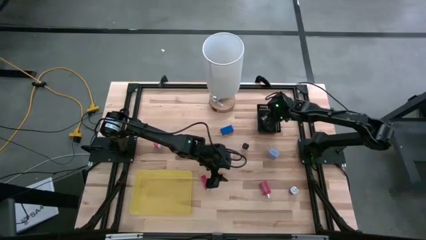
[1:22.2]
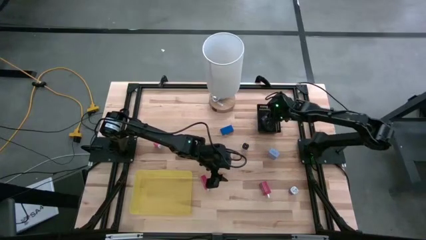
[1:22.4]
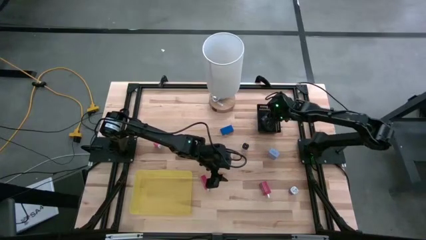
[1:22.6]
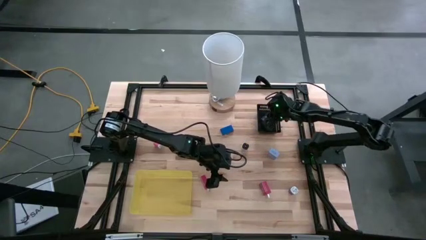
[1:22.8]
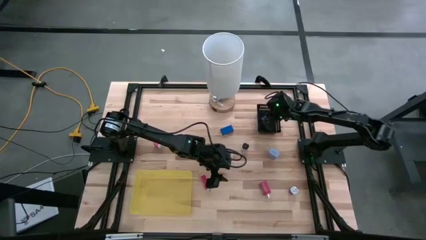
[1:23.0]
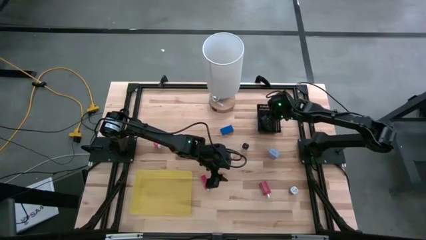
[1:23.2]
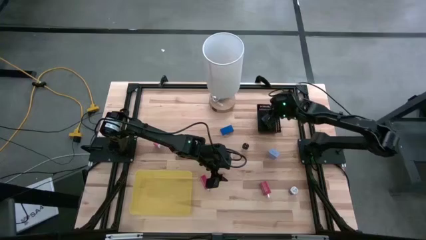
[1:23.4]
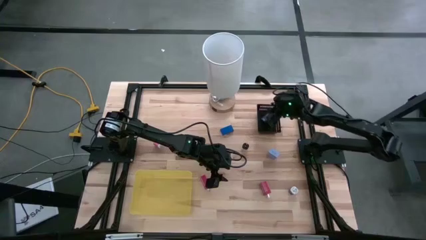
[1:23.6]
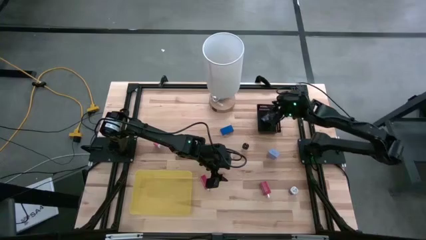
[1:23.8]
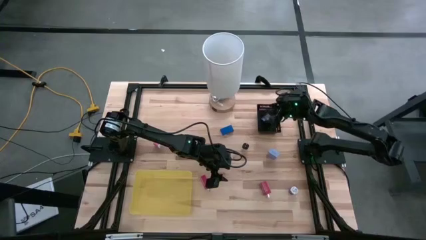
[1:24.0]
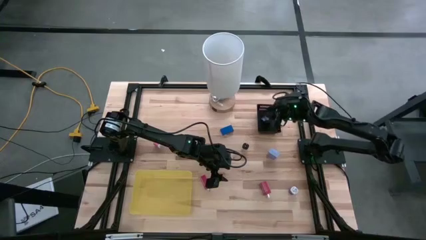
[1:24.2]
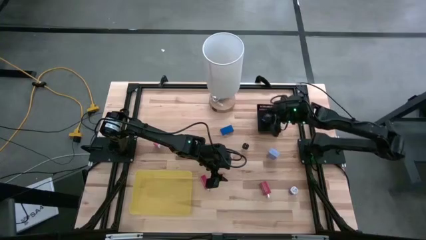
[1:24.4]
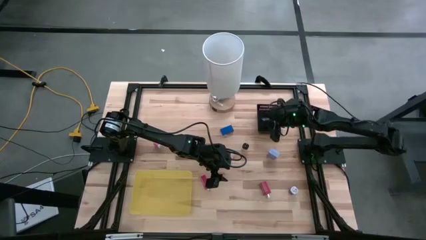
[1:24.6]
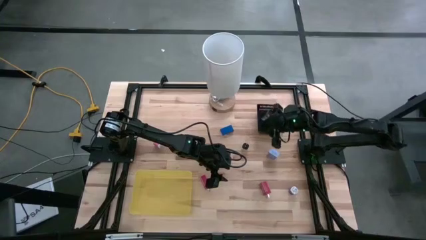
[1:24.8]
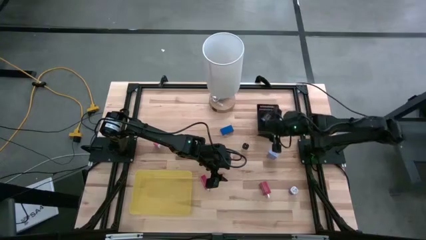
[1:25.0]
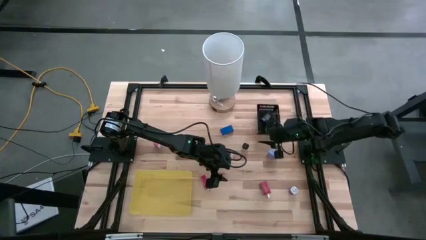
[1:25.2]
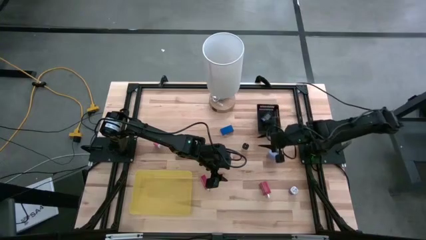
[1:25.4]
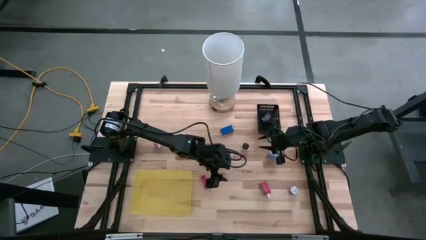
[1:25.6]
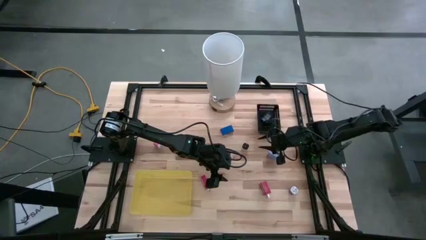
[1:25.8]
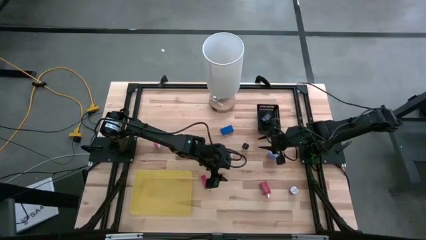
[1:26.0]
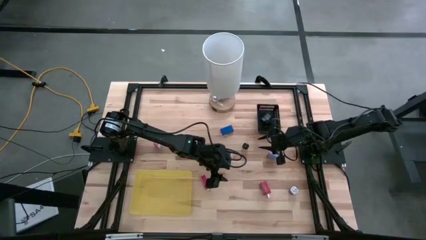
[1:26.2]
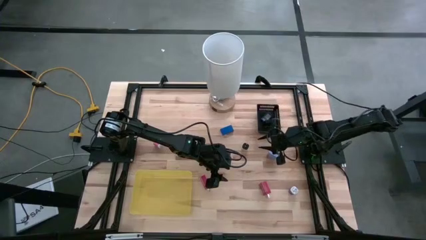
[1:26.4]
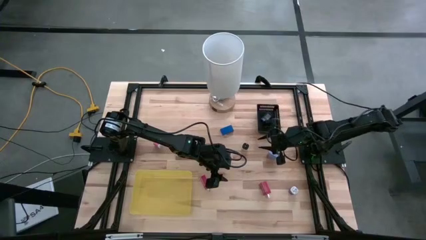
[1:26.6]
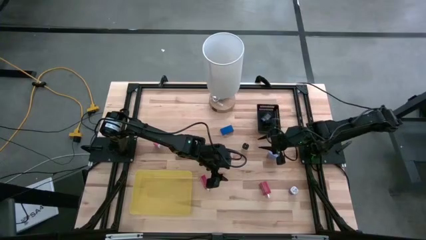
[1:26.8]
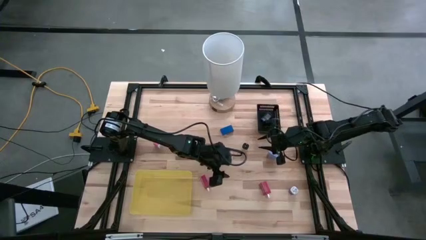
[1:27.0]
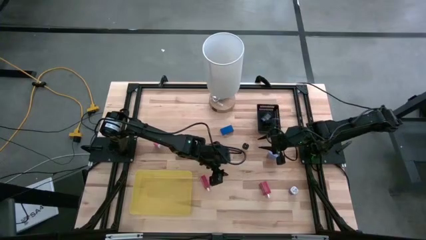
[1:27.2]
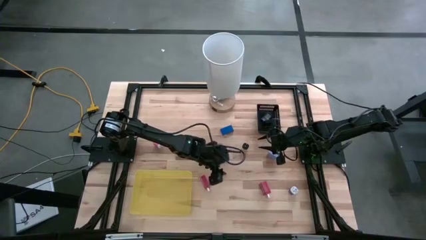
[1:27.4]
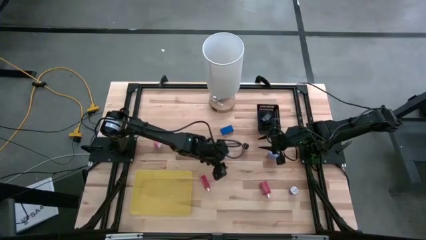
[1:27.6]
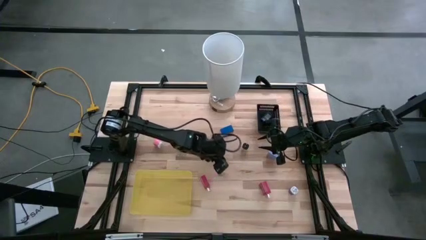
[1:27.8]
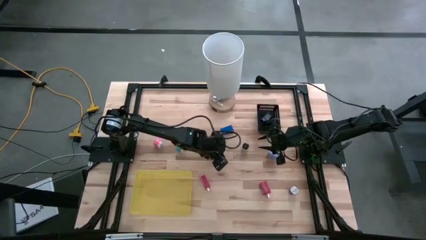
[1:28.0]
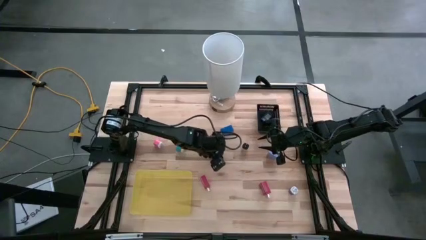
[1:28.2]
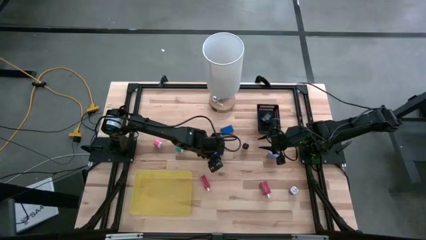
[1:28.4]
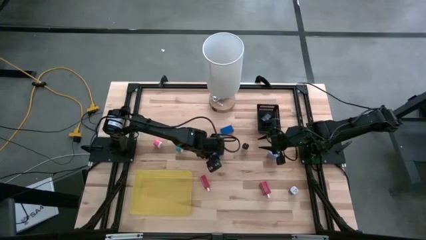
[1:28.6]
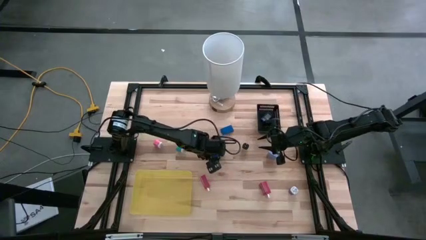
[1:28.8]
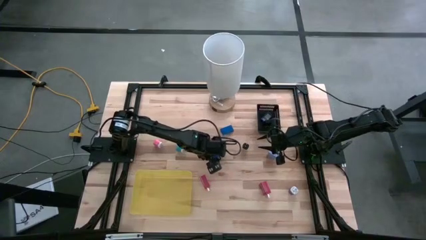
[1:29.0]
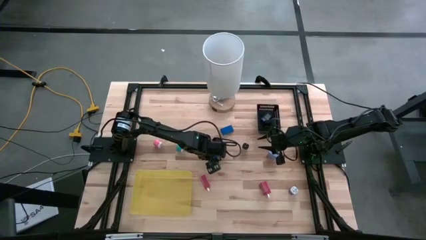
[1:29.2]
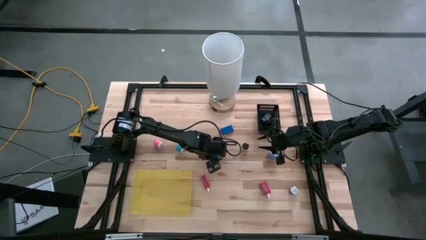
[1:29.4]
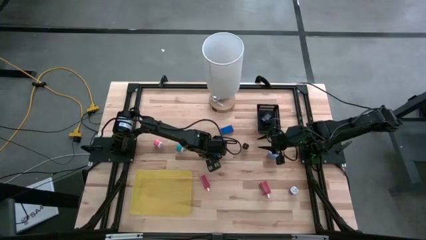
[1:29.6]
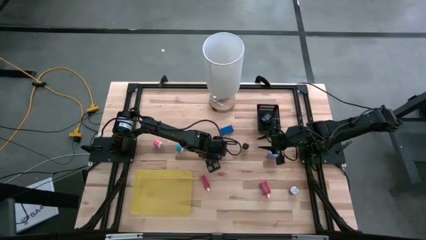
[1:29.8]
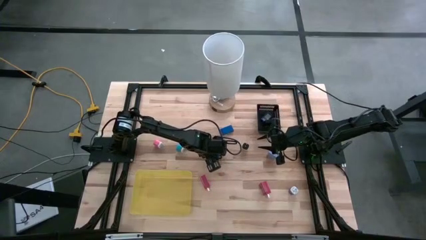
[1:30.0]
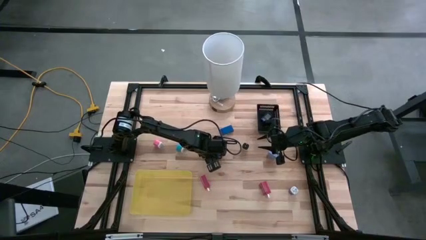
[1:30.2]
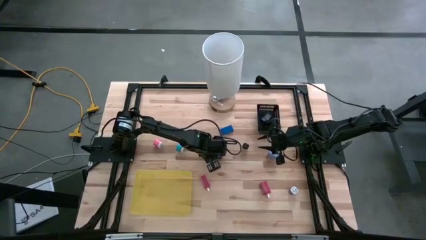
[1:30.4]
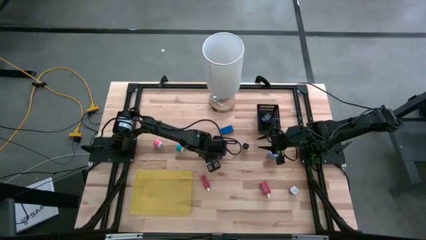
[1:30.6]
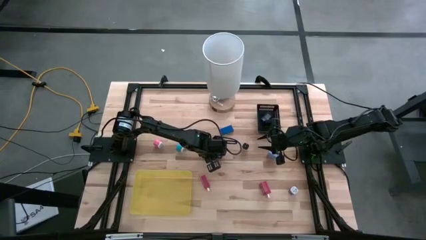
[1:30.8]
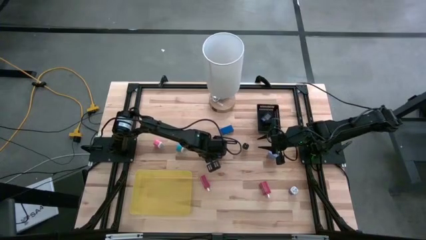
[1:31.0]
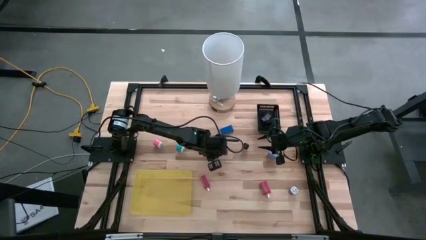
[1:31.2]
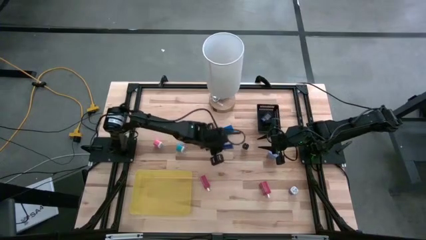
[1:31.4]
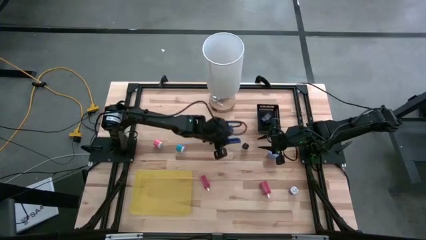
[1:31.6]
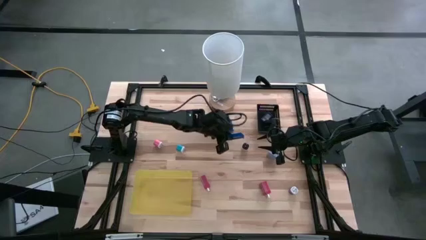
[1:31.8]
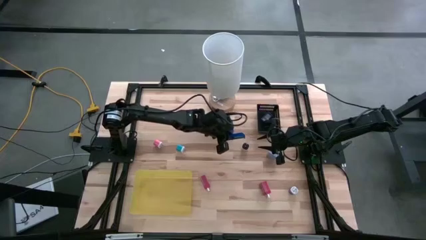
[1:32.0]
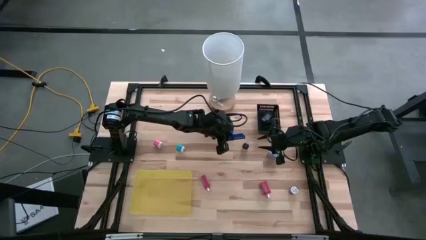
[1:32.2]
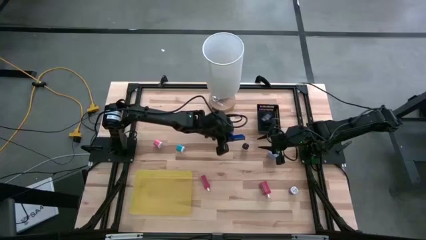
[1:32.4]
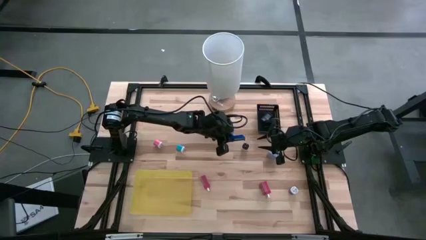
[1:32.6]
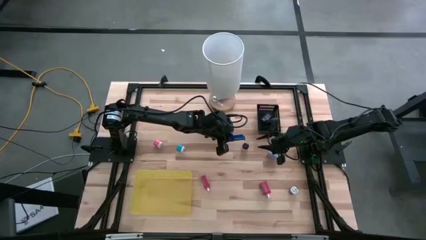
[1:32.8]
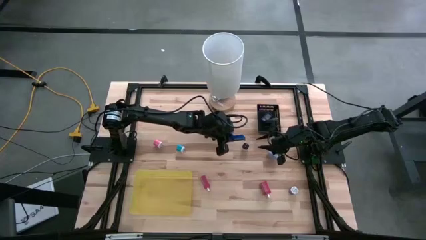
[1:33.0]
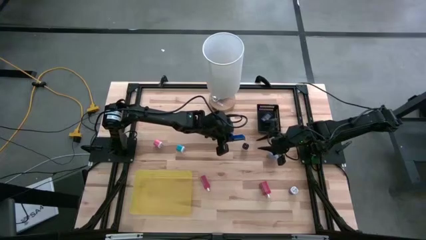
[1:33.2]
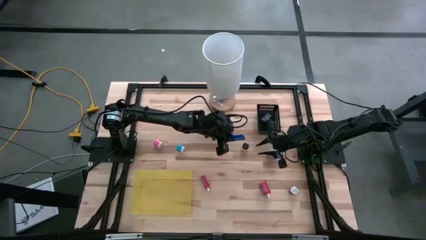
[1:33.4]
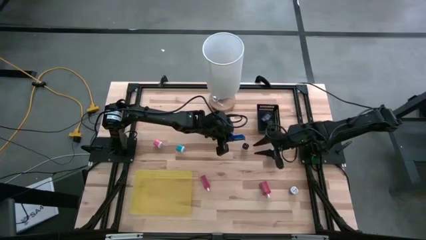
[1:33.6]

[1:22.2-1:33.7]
Task: Pick & Place Office items
Put the bottom blue digital clock into the black bin
